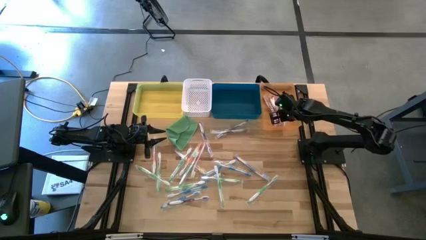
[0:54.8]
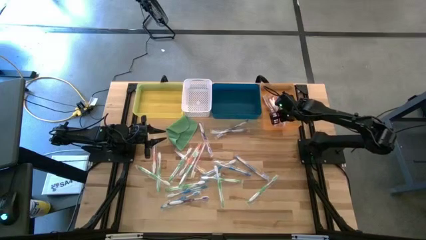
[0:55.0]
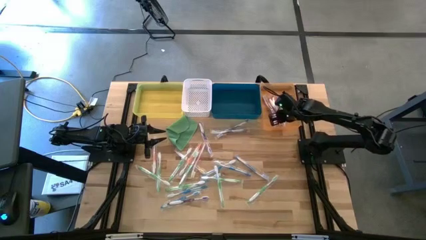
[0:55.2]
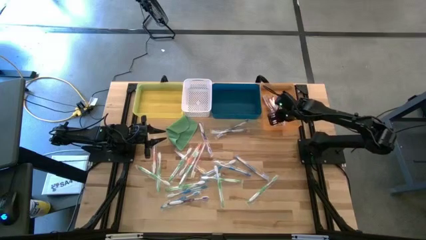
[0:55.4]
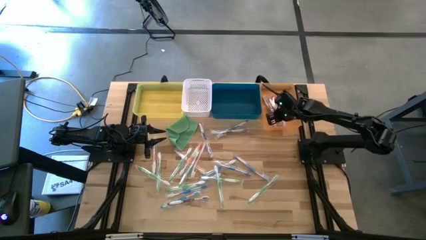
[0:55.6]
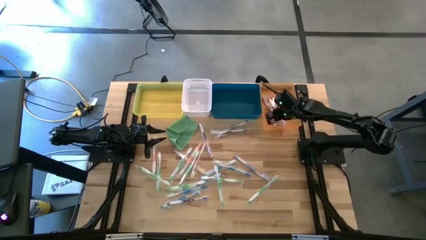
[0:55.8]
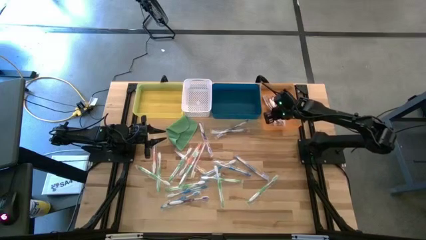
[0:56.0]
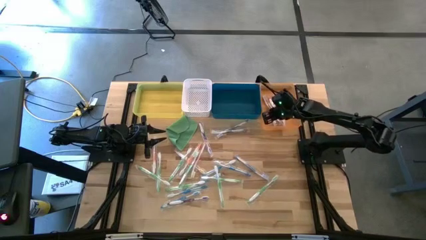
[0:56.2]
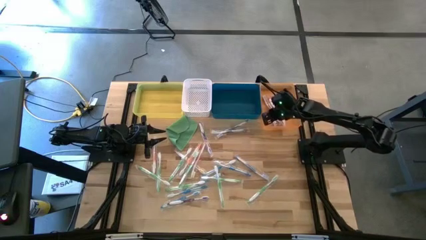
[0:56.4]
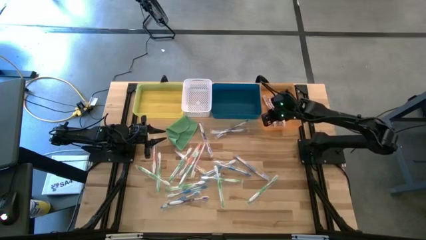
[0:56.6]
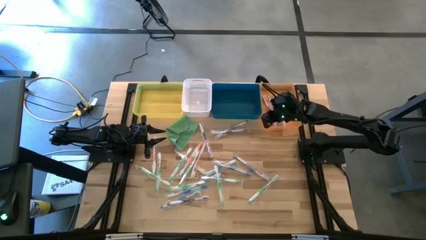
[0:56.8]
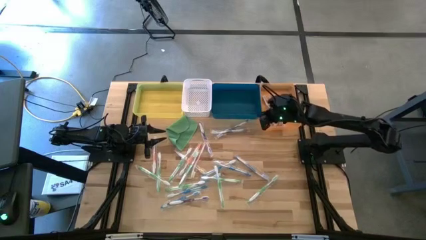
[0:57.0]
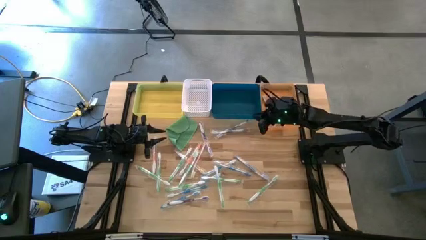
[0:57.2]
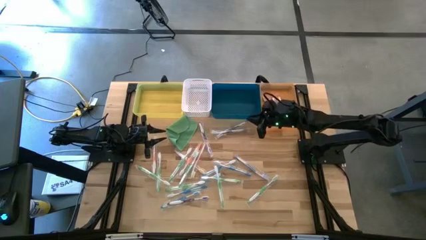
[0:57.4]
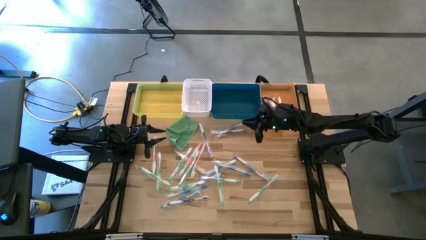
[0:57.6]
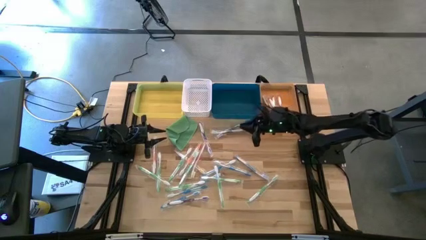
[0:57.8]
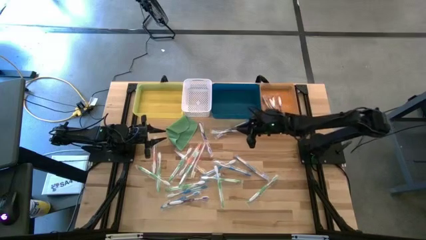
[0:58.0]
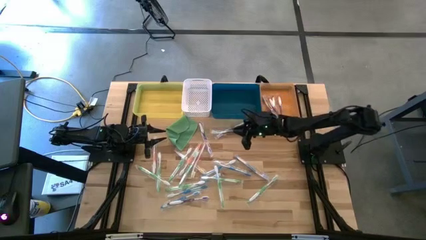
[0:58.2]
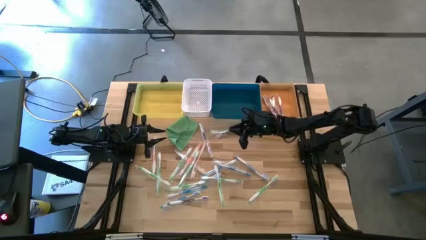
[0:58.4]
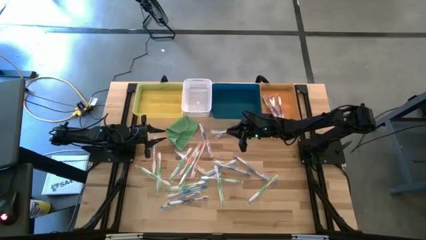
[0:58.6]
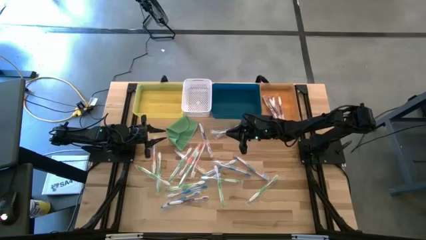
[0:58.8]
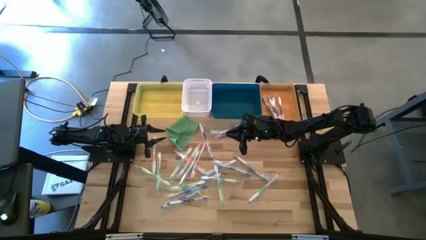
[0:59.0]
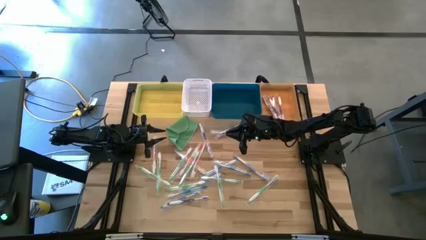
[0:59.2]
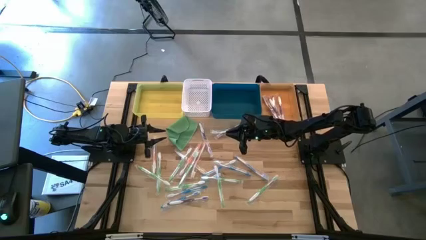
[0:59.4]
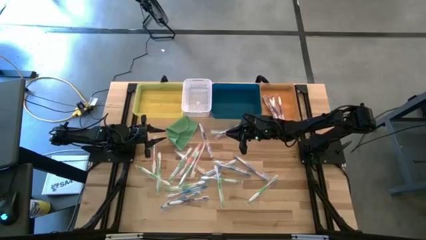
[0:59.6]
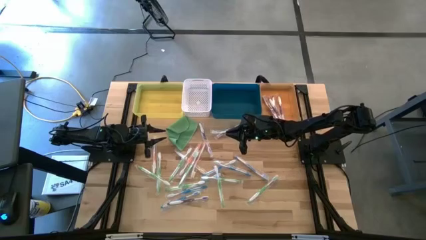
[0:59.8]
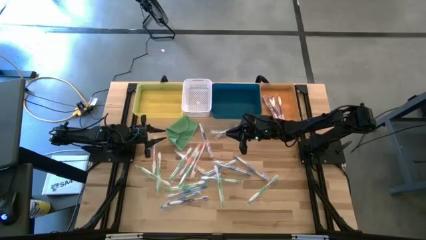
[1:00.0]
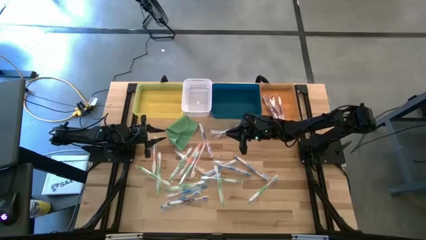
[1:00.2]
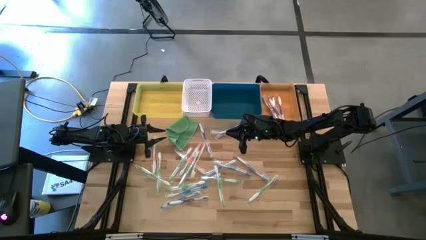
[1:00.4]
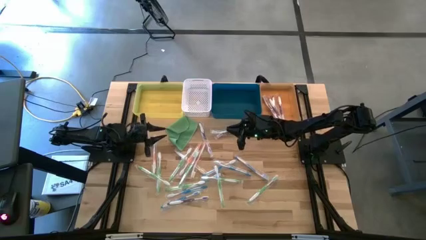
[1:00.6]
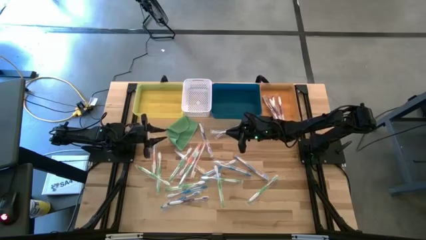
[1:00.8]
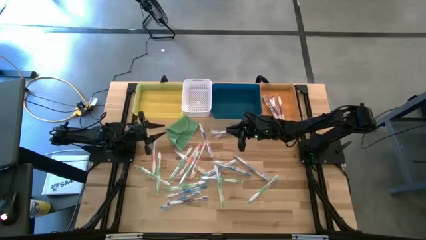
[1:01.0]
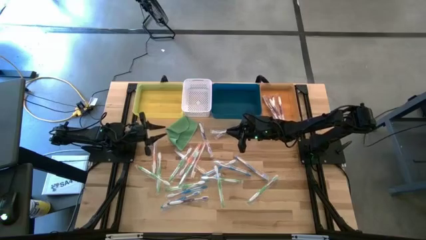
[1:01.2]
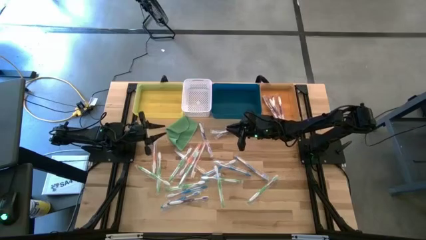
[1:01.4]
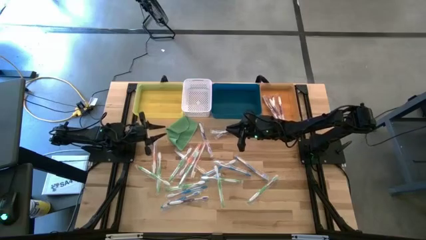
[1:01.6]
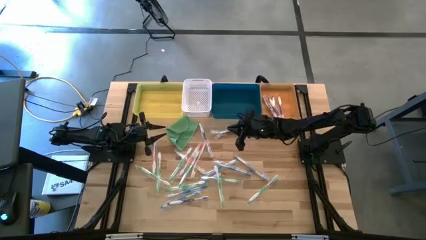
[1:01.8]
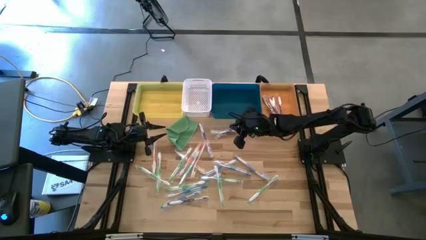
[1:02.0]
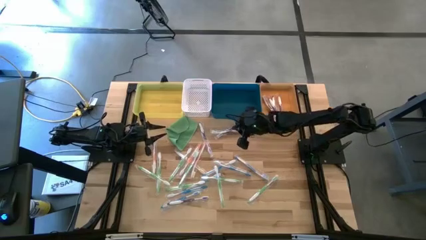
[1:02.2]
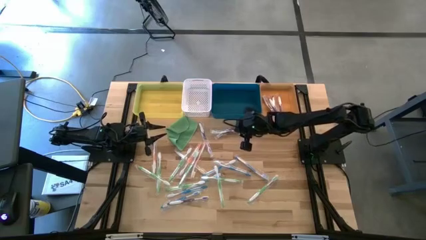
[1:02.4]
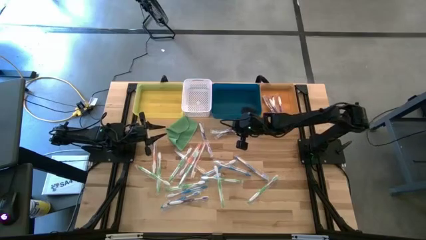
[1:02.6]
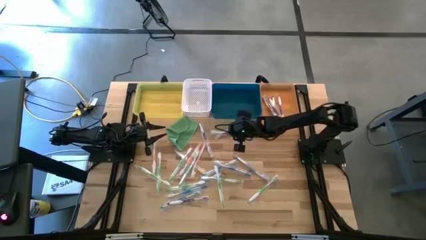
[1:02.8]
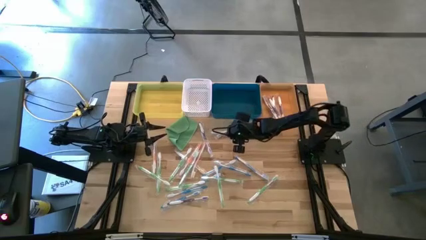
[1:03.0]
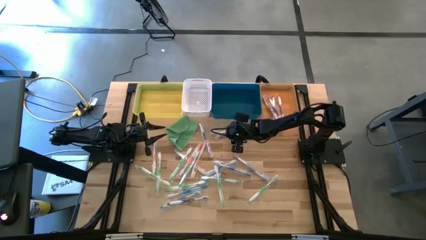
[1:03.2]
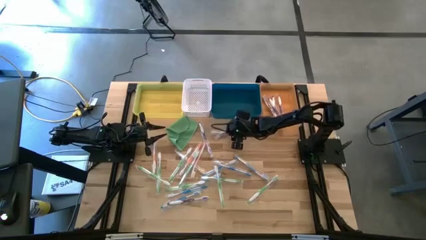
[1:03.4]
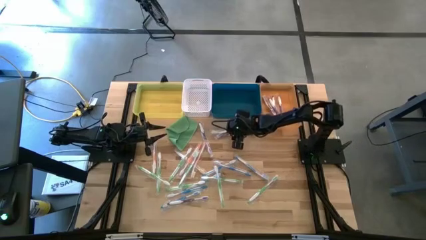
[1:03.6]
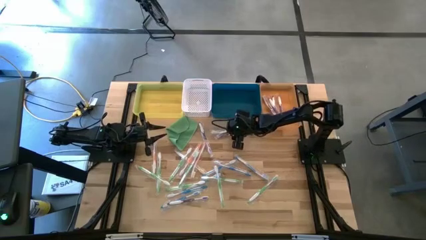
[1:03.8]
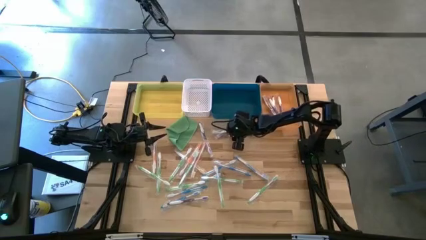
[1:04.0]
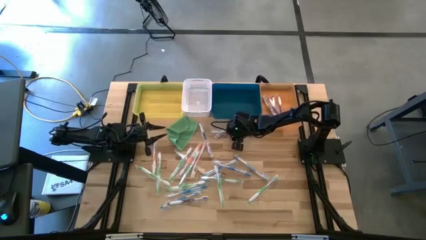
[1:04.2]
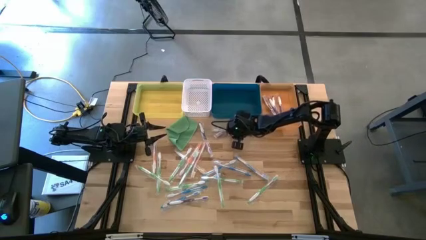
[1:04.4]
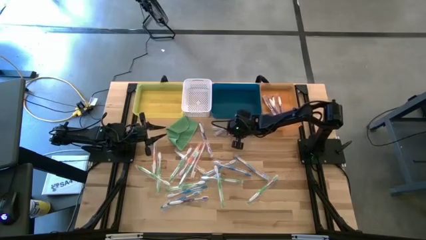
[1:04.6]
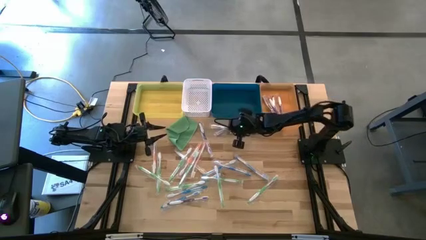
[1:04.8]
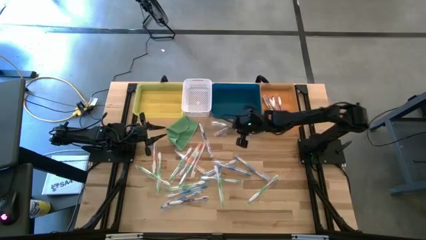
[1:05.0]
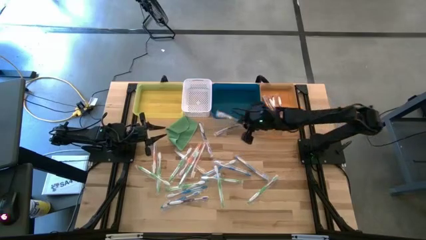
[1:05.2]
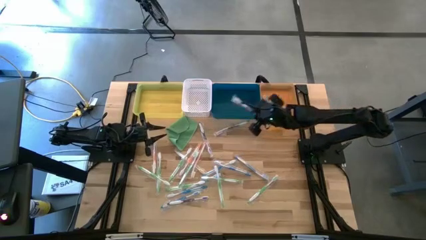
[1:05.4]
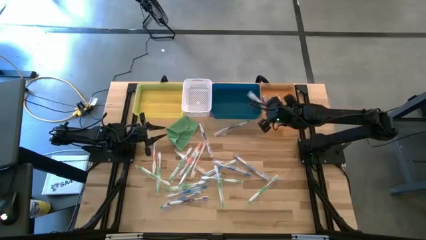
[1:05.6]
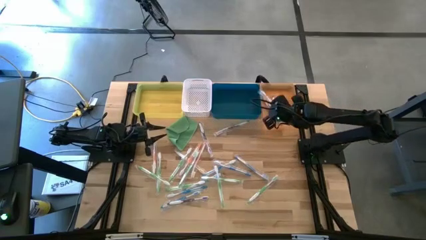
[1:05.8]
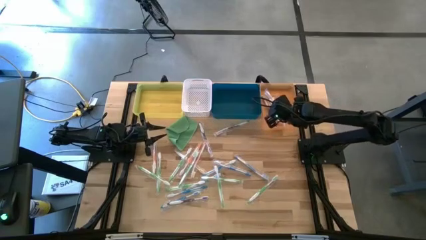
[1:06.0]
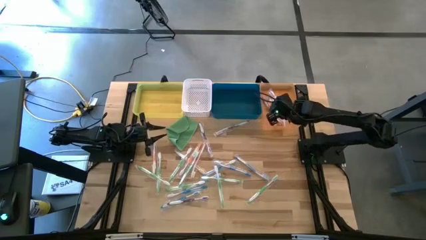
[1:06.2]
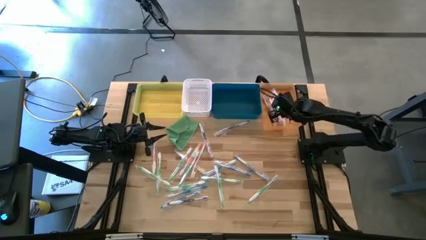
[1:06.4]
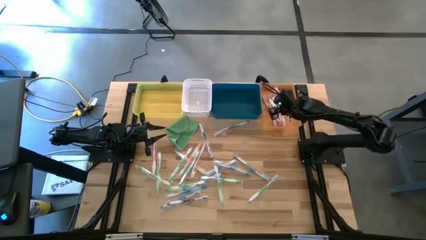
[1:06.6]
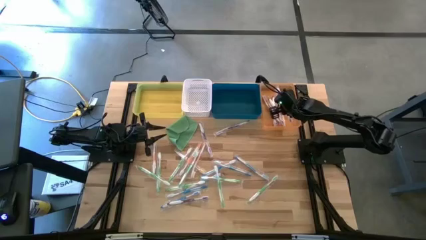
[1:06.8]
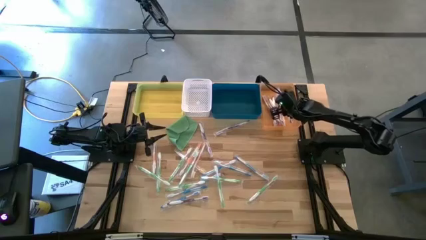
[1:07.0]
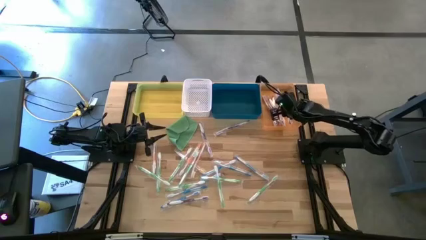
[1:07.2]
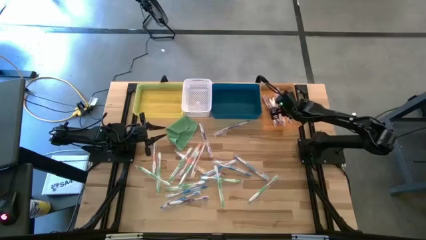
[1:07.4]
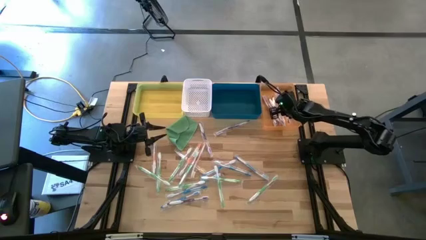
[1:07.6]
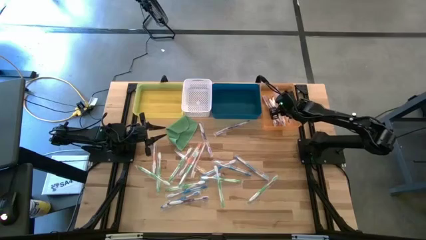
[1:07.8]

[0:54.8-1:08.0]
Task: Pick & Place Toothbrushes
Put the violet toothbrush into the orange bin
